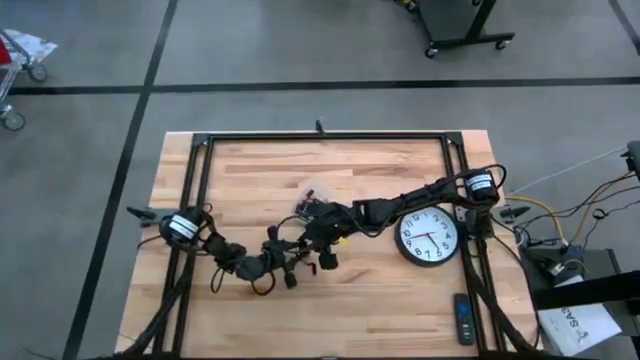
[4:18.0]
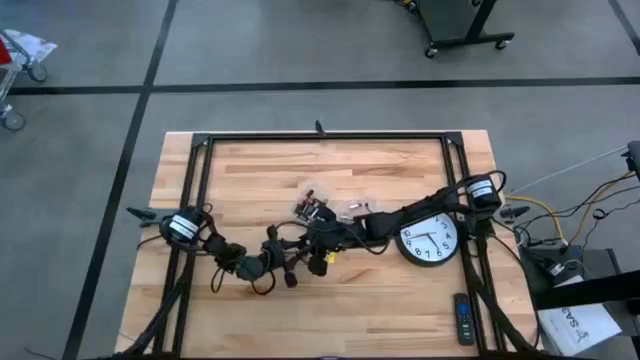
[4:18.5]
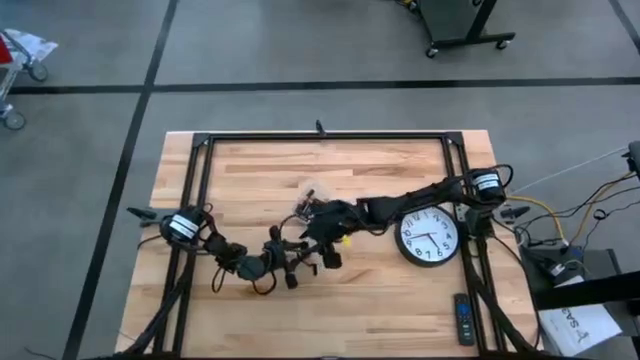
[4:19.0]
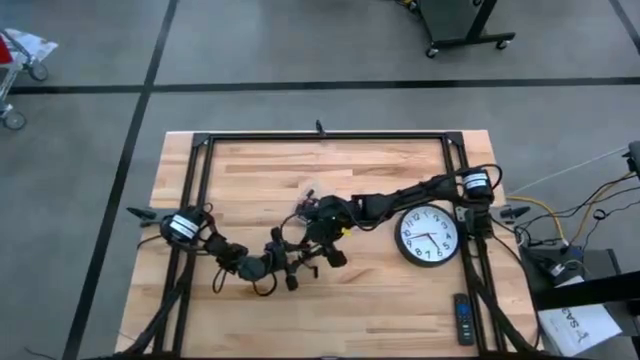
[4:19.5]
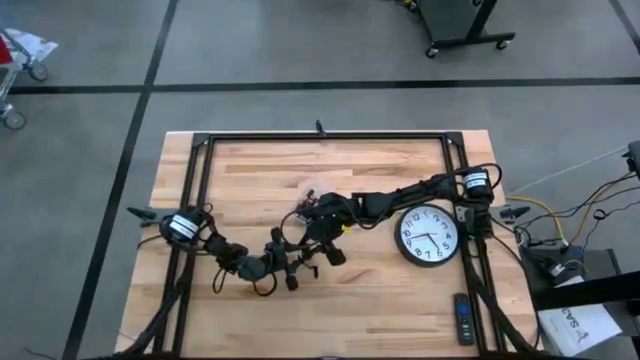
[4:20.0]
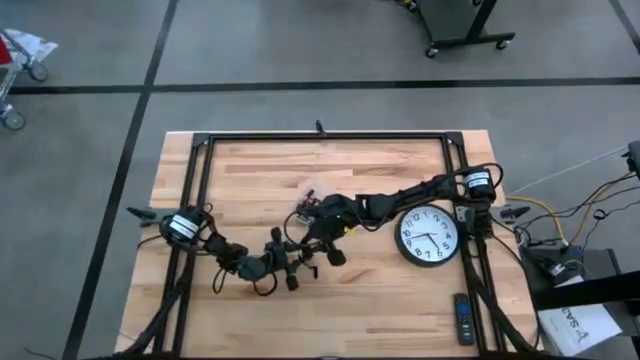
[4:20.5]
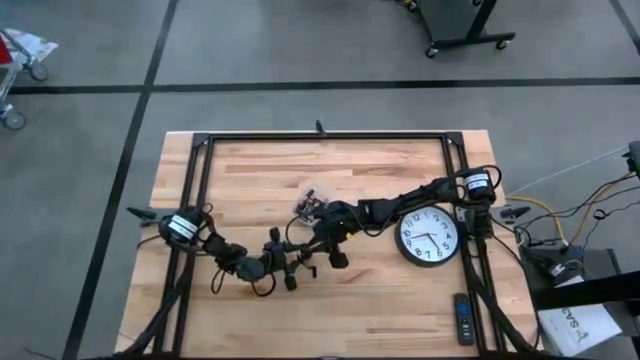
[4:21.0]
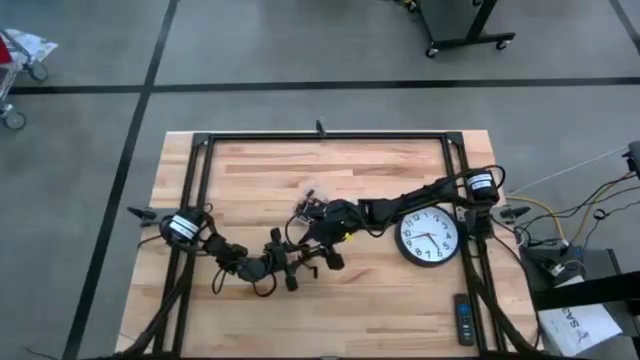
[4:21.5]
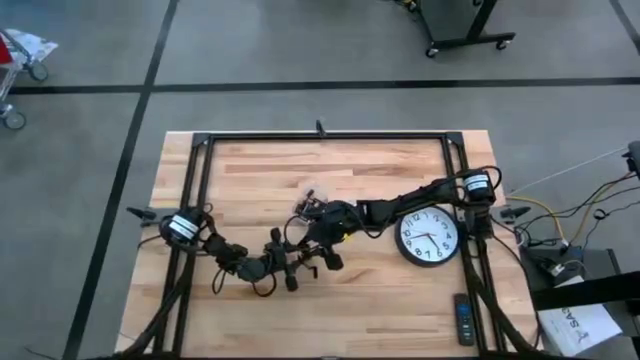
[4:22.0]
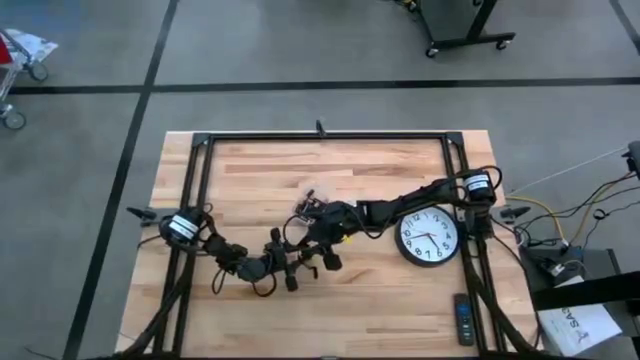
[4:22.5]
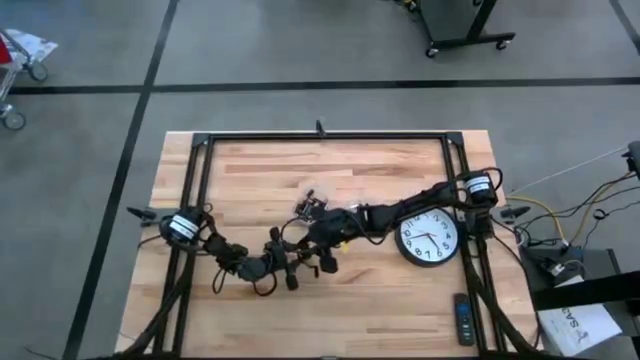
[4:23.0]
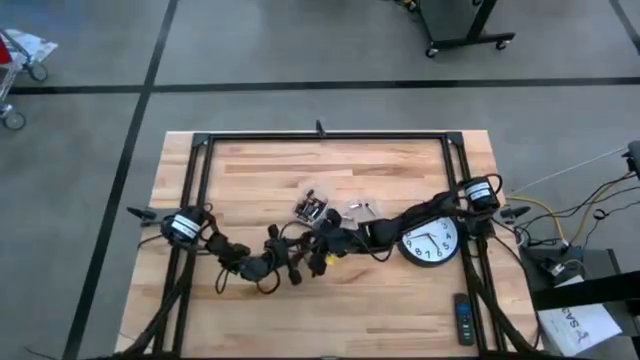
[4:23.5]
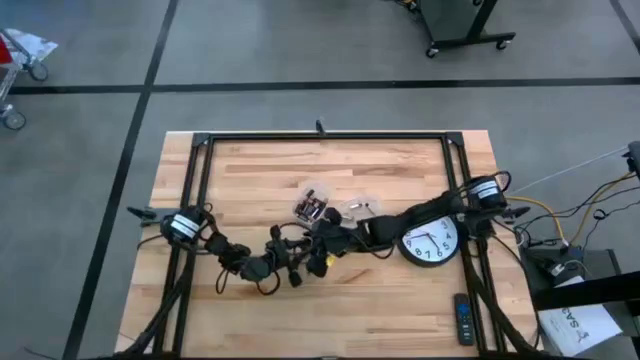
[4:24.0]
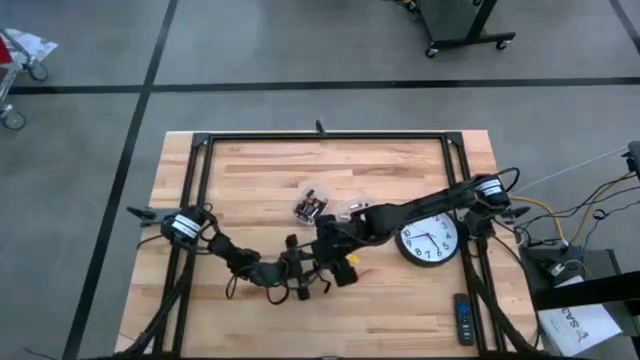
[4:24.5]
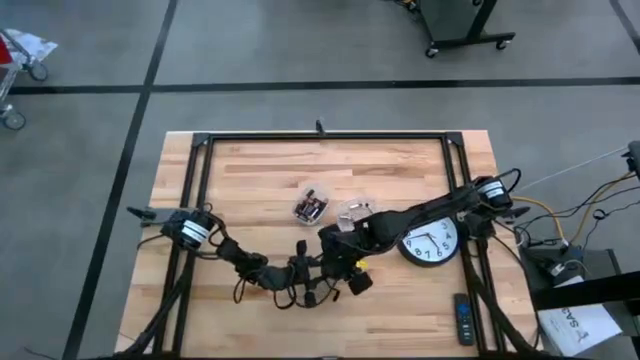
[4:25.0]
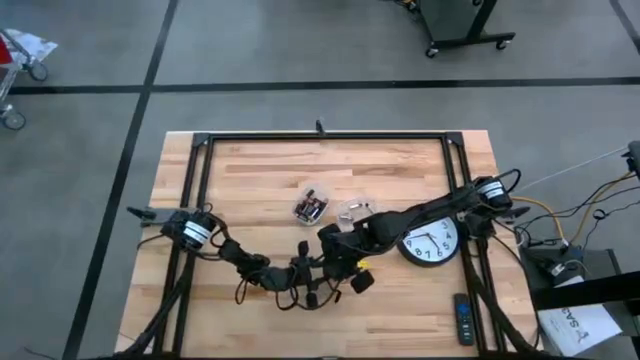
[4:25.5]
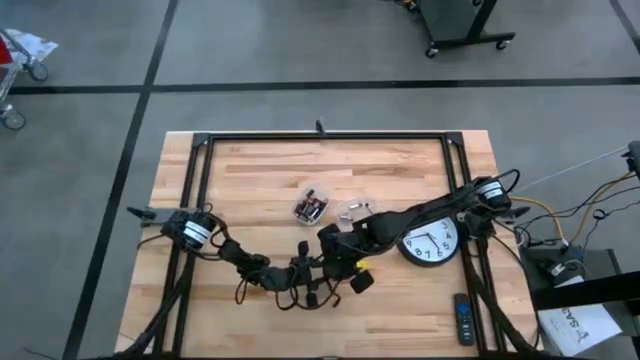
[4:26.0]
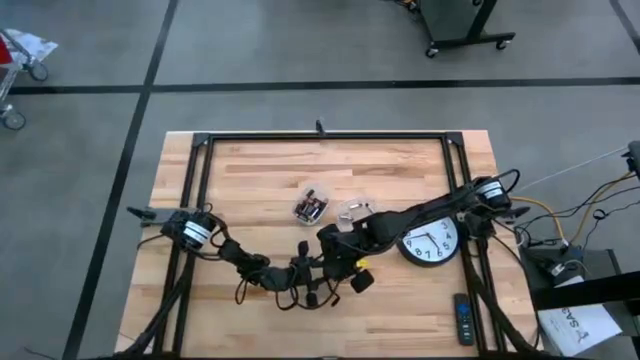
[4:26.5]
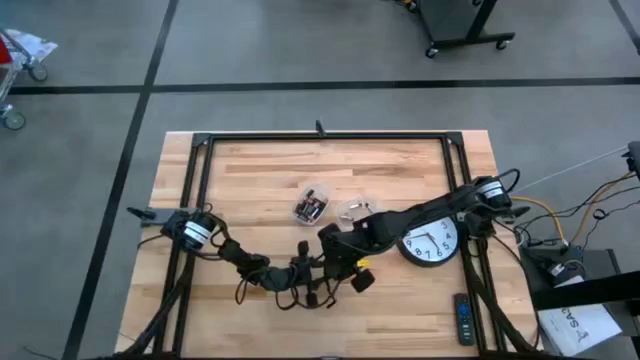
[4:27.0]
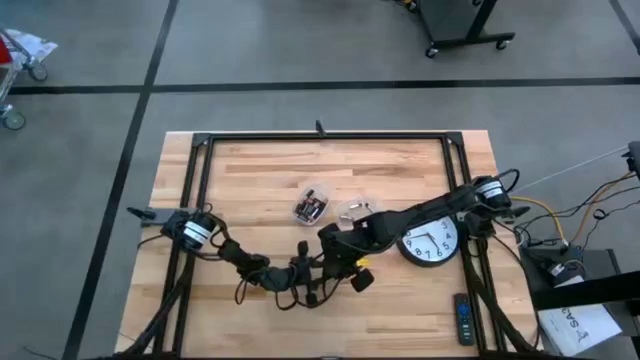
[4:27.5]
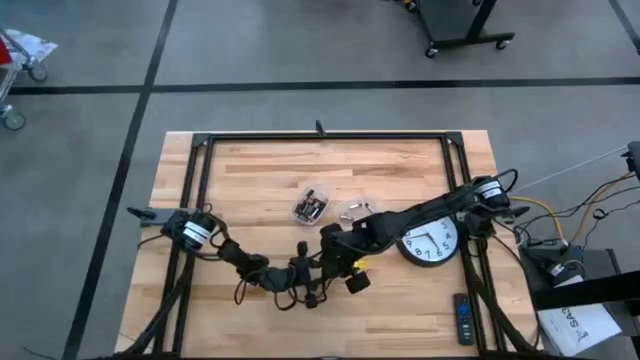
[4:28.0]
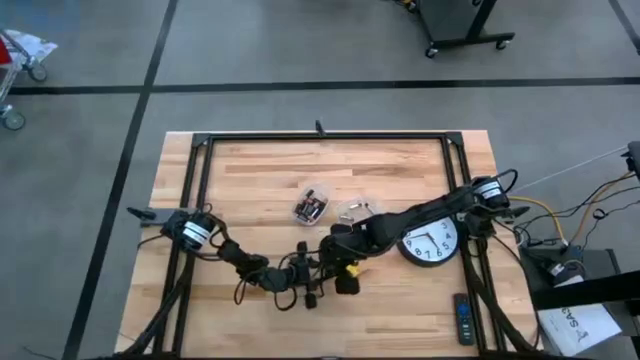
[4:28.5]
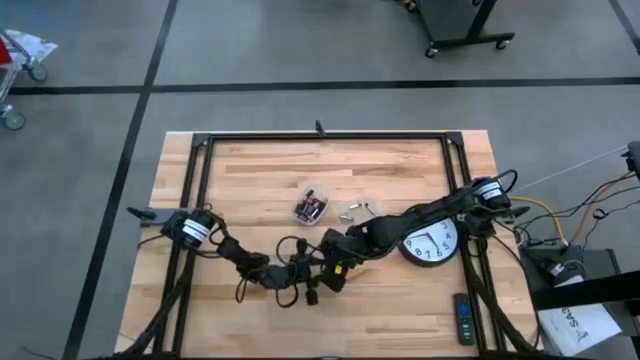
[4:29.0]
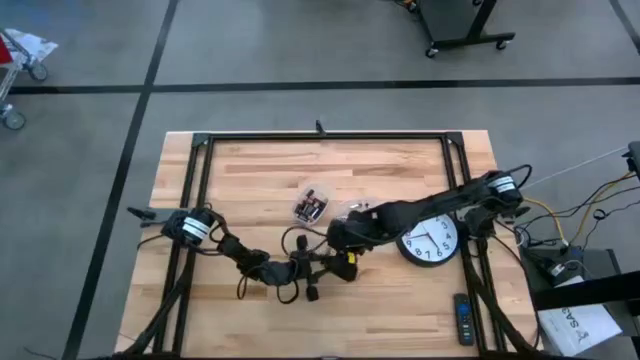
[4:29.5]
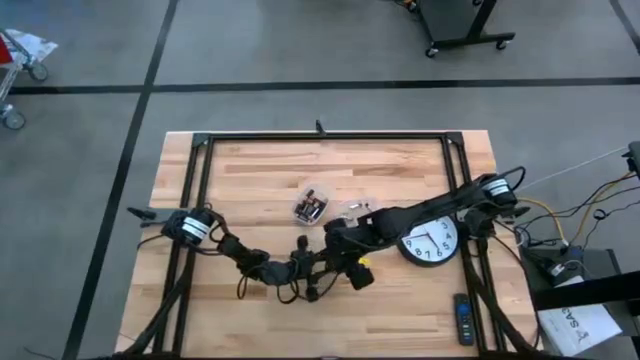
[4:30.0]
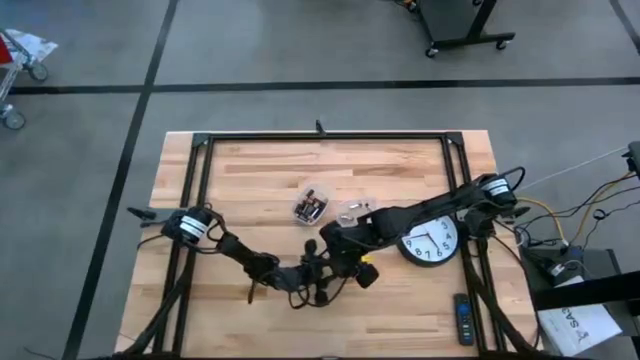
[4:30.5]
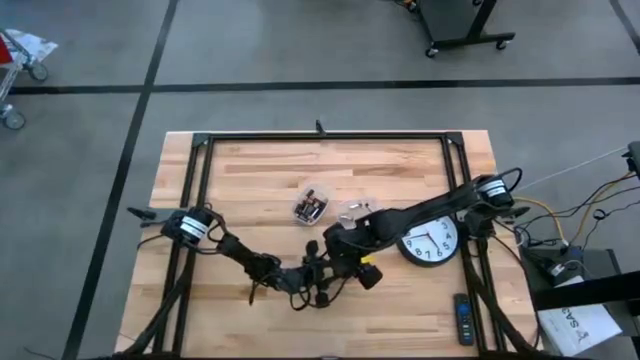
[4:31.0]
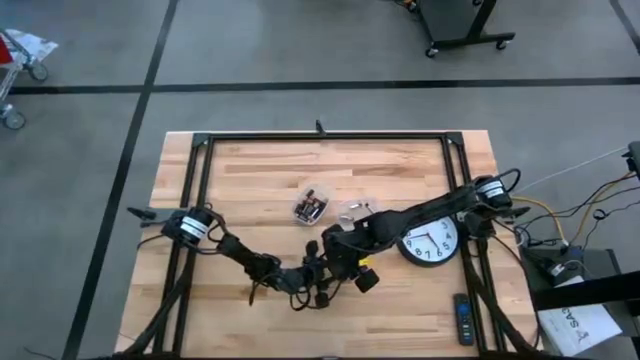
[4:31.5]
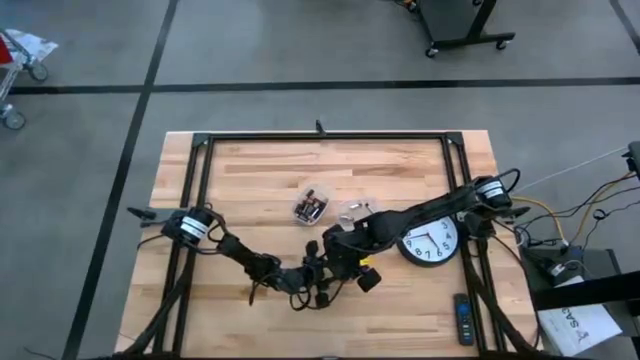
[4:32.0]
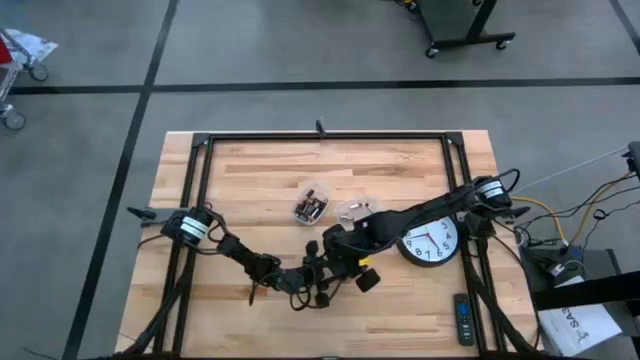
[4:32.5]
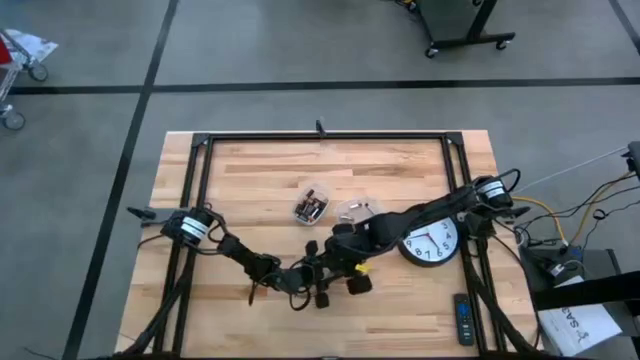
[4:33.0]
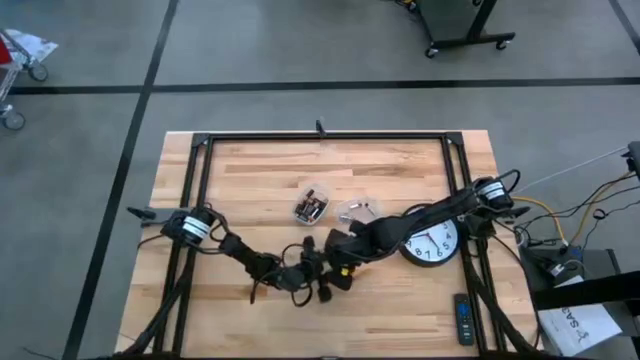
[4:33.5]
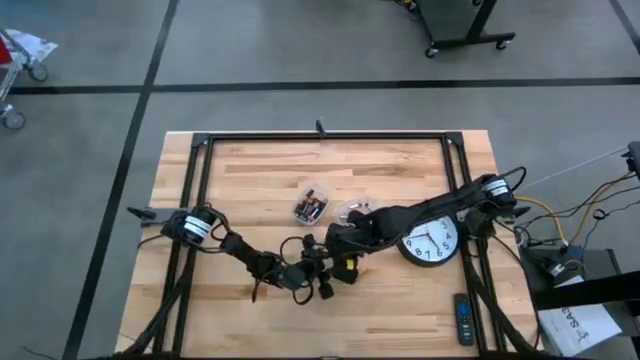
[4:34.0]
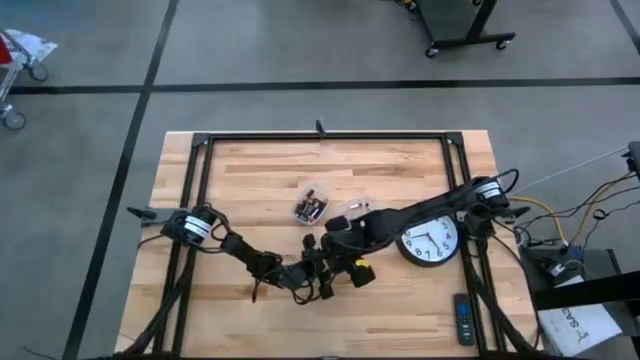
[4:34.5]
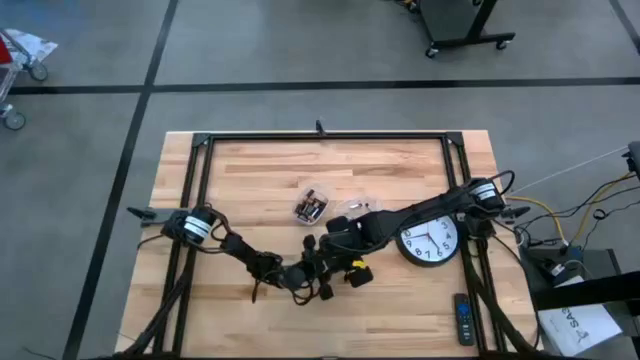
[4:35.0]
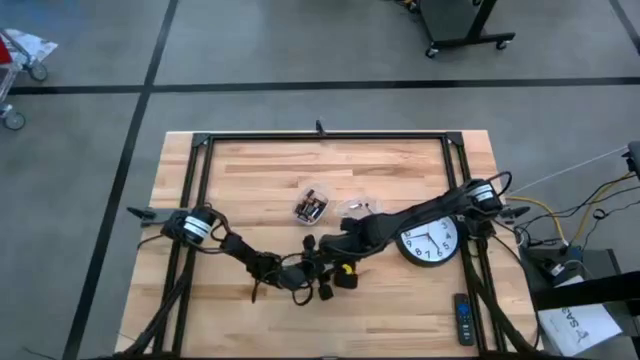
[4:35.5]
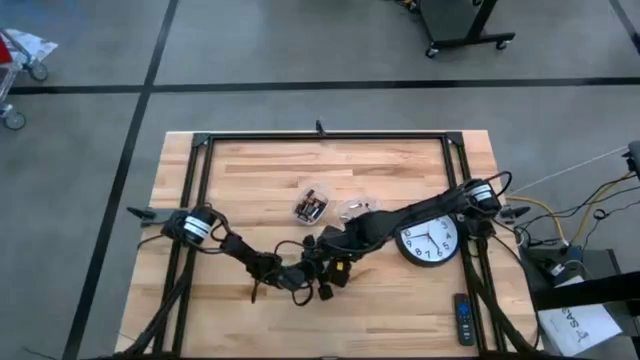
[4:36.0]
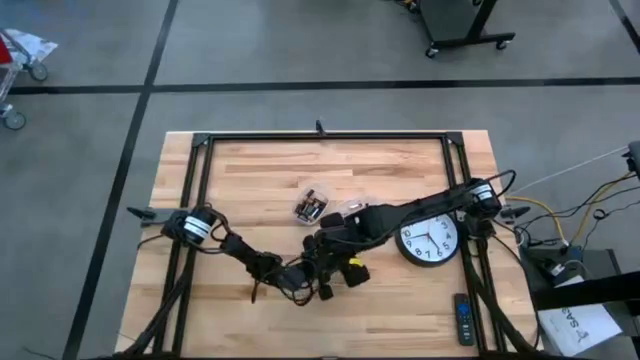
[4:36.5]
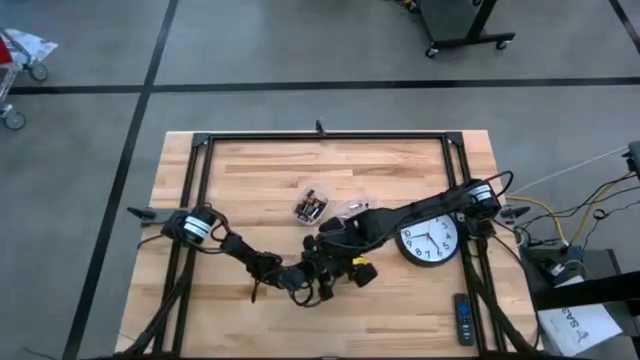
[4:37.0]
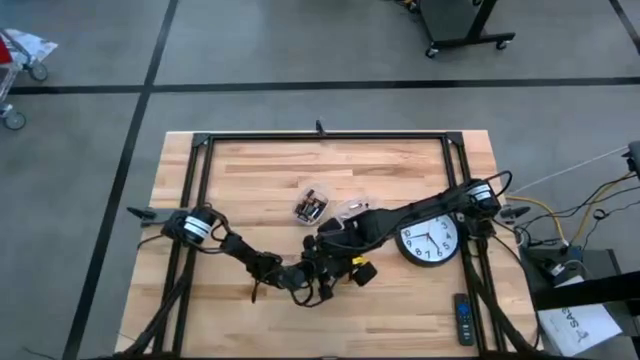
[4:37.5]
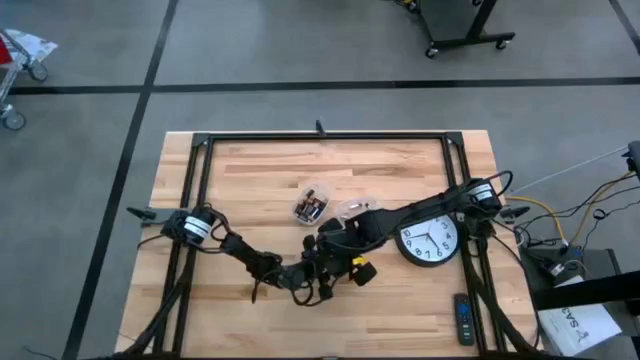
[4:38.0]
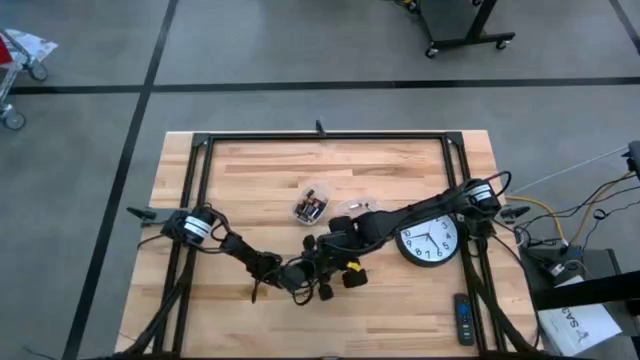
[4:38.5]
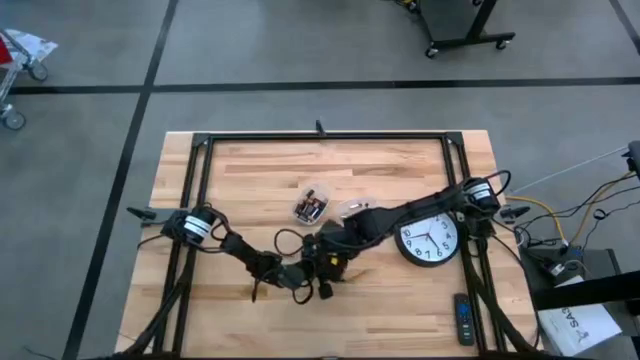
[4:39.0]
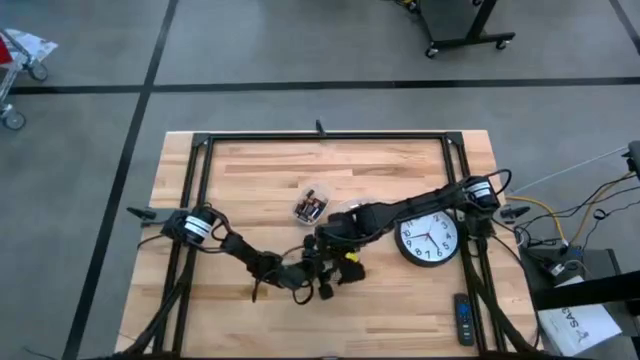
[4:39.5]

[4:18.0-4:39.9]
Task: Insert battery
Close the black flashlight cover
